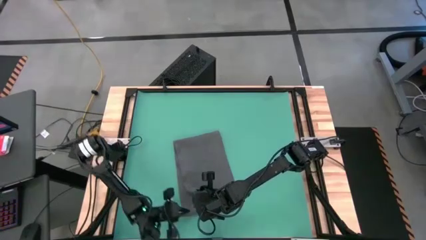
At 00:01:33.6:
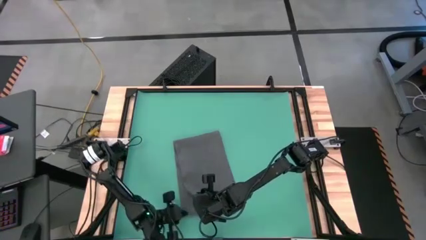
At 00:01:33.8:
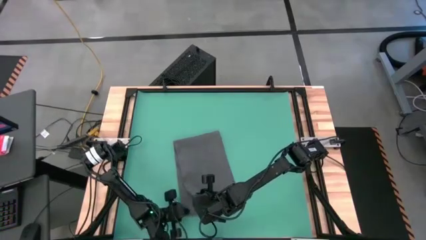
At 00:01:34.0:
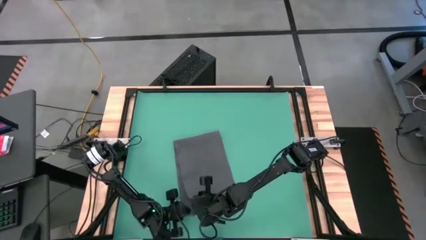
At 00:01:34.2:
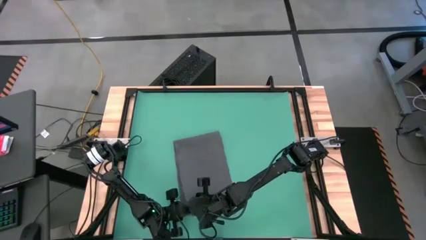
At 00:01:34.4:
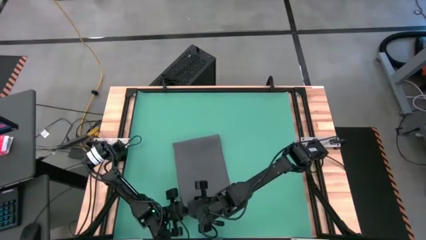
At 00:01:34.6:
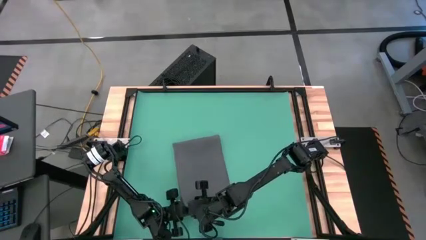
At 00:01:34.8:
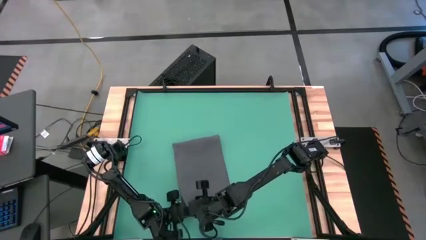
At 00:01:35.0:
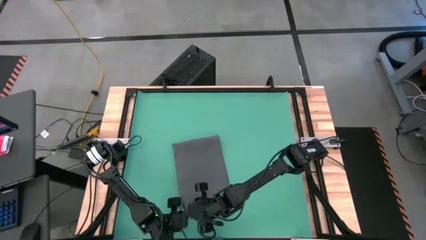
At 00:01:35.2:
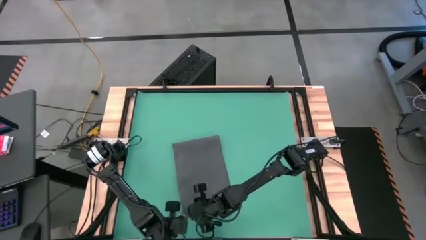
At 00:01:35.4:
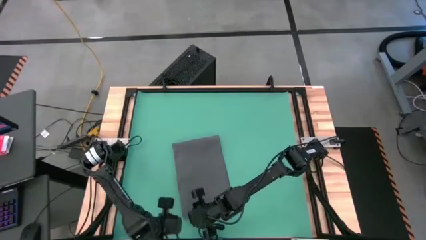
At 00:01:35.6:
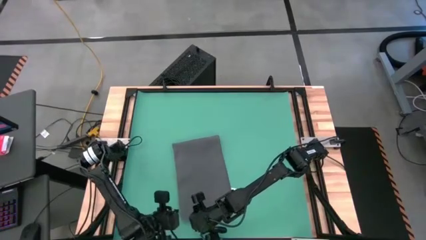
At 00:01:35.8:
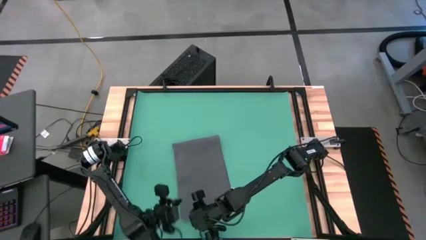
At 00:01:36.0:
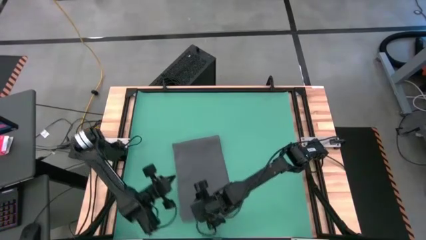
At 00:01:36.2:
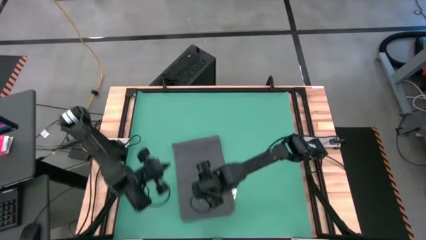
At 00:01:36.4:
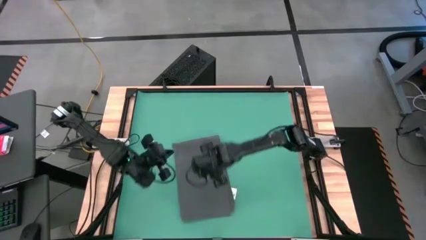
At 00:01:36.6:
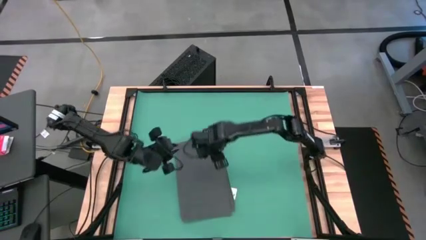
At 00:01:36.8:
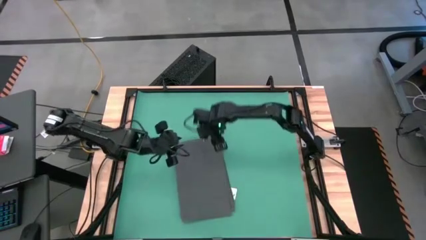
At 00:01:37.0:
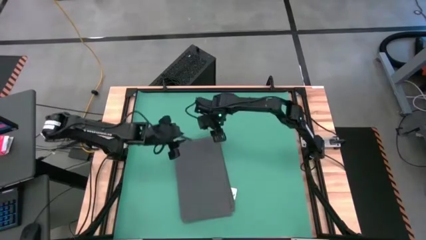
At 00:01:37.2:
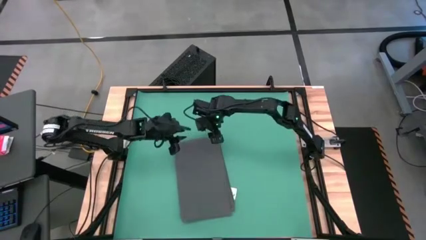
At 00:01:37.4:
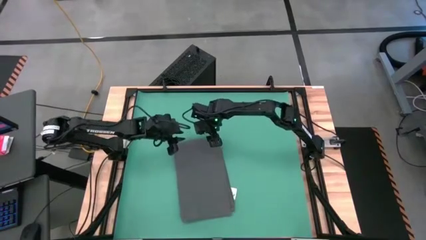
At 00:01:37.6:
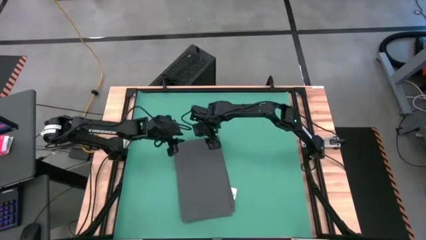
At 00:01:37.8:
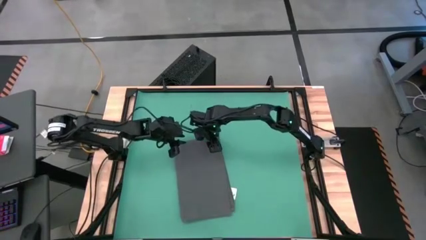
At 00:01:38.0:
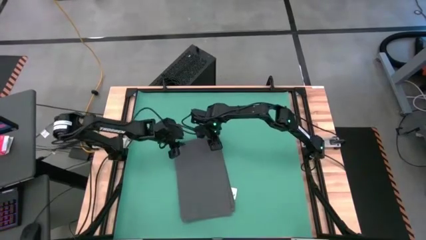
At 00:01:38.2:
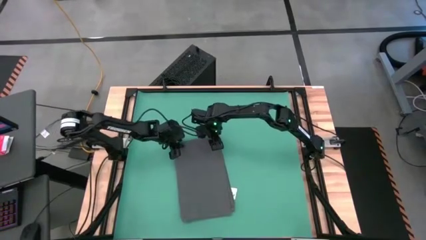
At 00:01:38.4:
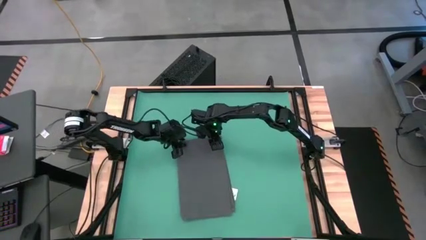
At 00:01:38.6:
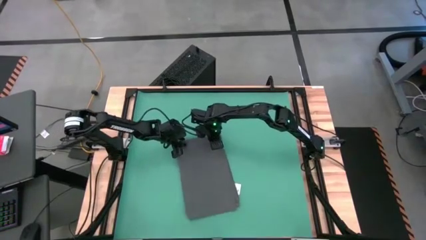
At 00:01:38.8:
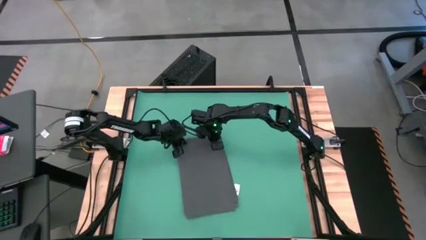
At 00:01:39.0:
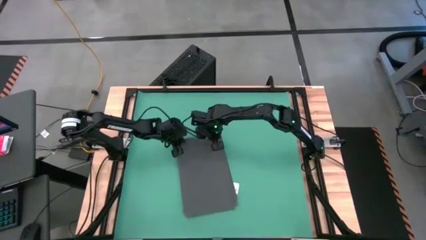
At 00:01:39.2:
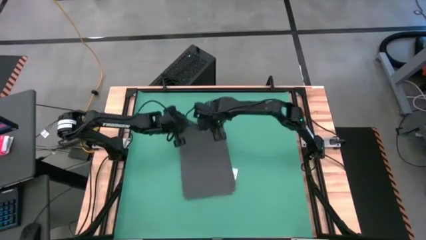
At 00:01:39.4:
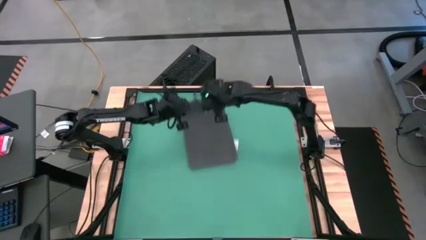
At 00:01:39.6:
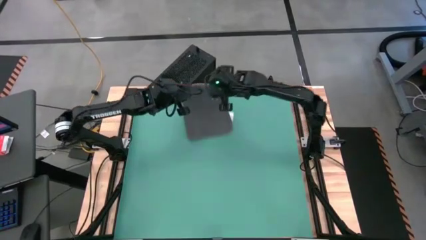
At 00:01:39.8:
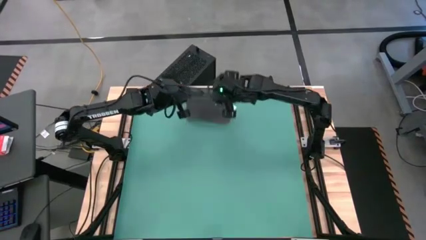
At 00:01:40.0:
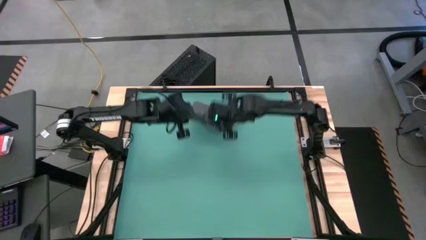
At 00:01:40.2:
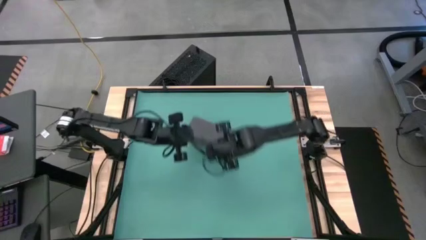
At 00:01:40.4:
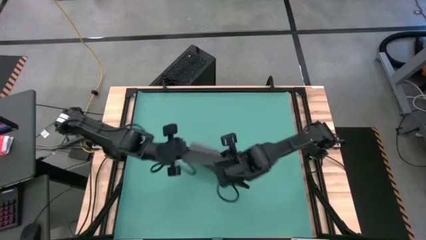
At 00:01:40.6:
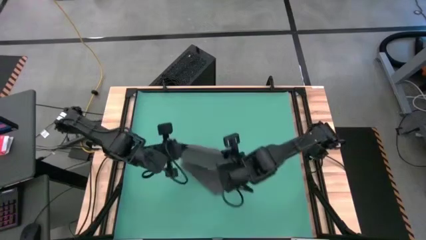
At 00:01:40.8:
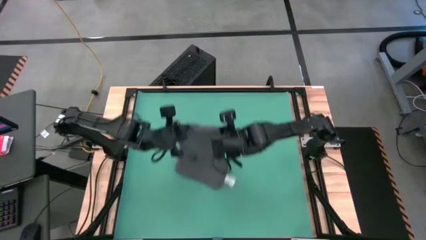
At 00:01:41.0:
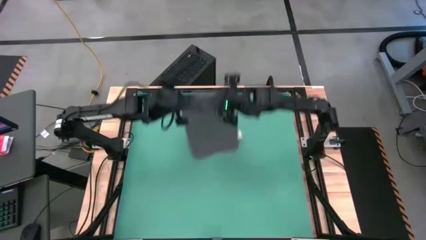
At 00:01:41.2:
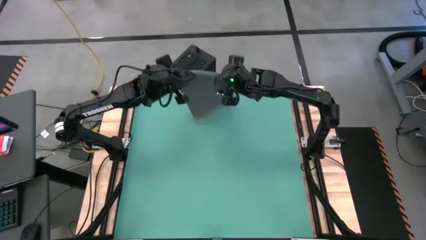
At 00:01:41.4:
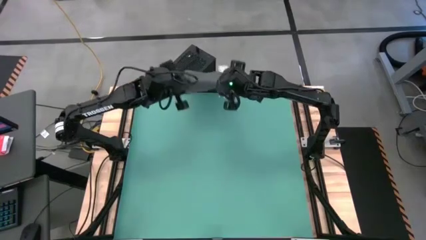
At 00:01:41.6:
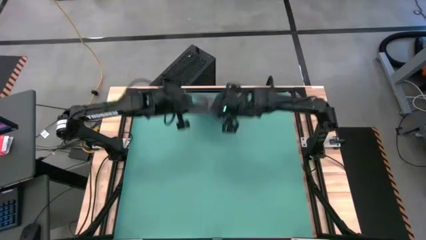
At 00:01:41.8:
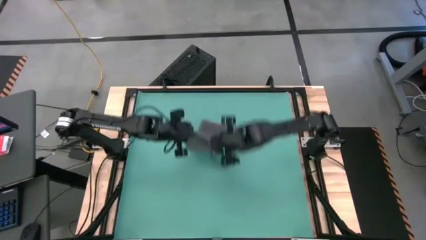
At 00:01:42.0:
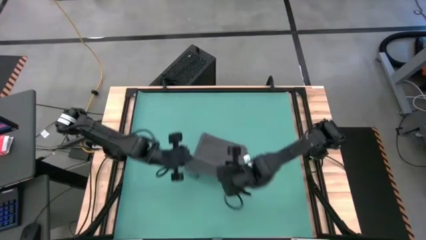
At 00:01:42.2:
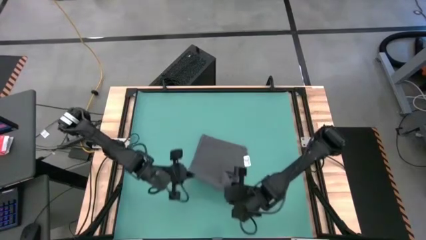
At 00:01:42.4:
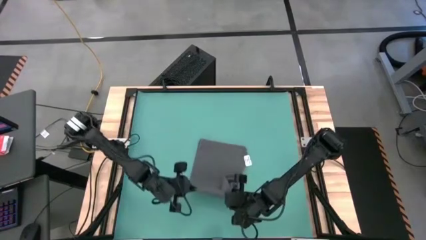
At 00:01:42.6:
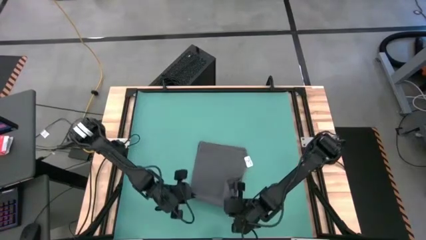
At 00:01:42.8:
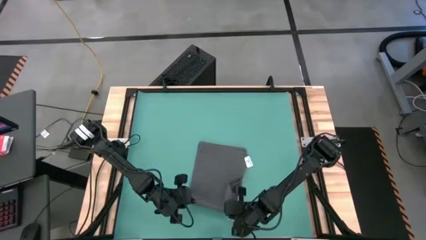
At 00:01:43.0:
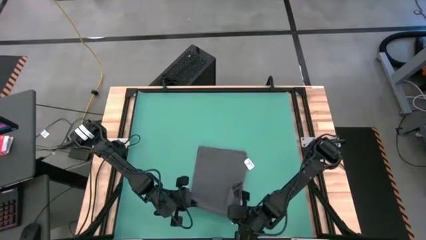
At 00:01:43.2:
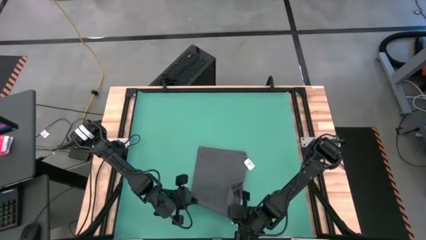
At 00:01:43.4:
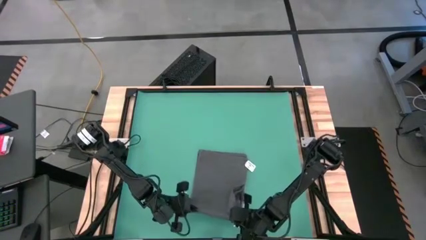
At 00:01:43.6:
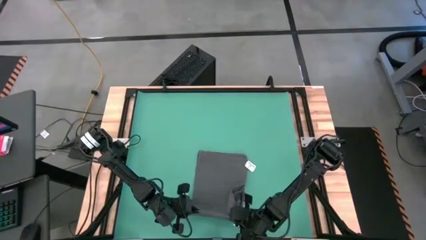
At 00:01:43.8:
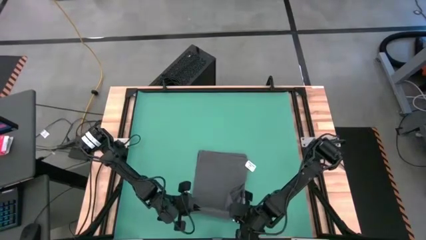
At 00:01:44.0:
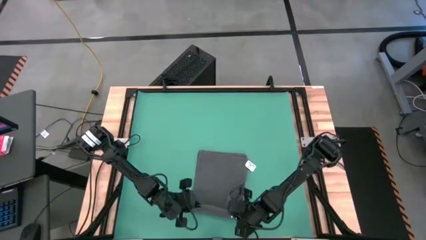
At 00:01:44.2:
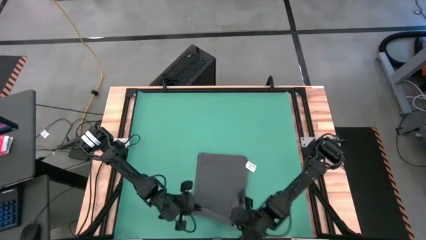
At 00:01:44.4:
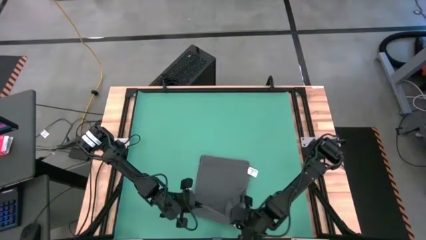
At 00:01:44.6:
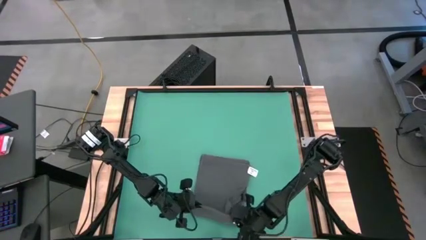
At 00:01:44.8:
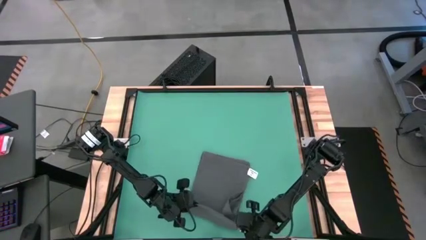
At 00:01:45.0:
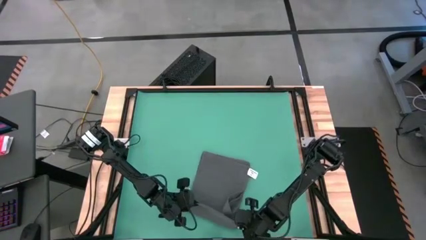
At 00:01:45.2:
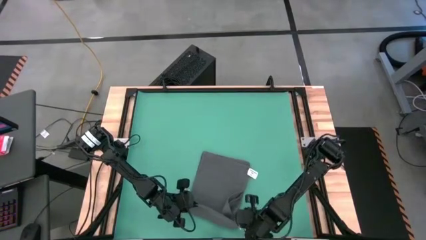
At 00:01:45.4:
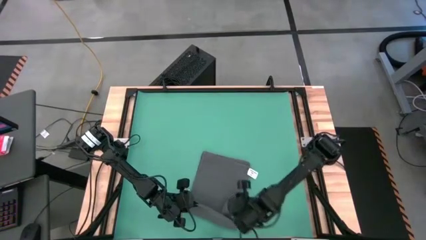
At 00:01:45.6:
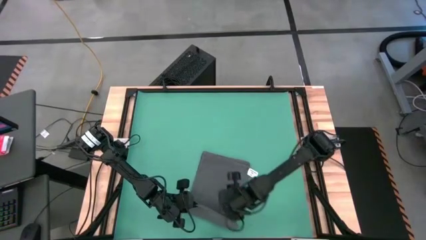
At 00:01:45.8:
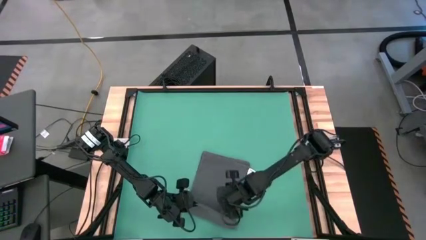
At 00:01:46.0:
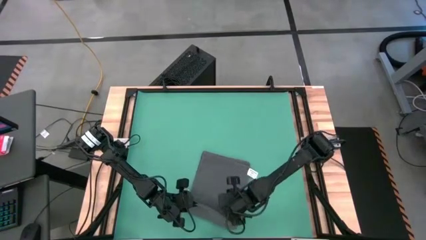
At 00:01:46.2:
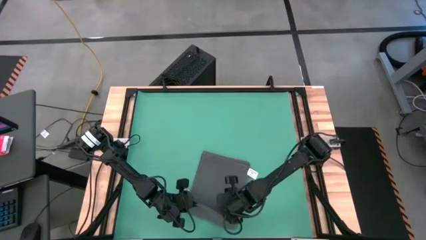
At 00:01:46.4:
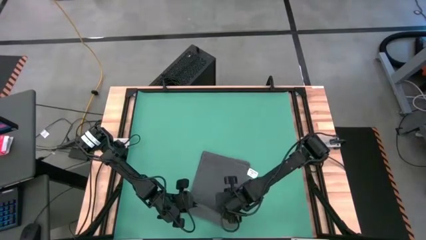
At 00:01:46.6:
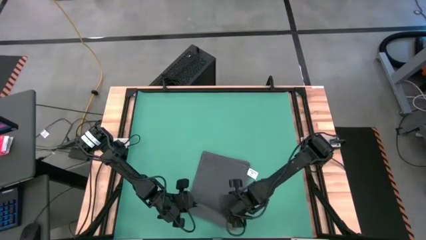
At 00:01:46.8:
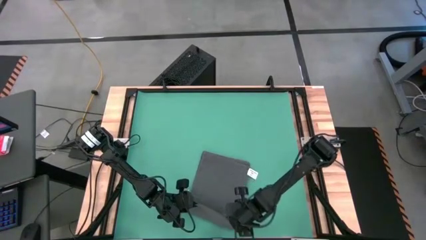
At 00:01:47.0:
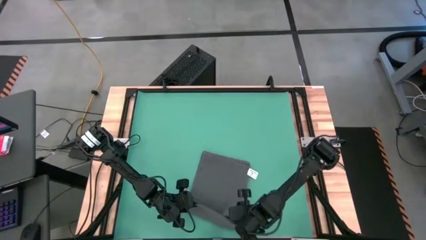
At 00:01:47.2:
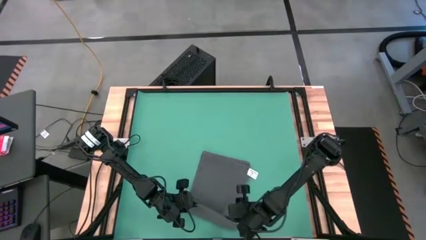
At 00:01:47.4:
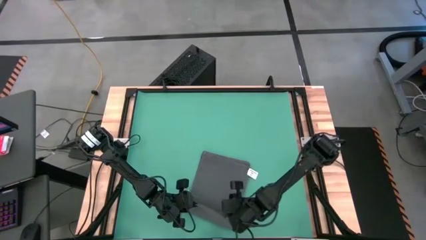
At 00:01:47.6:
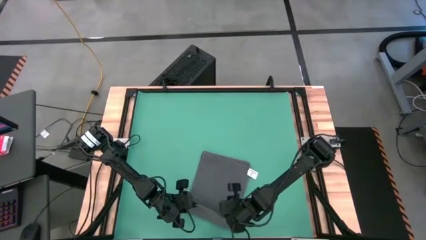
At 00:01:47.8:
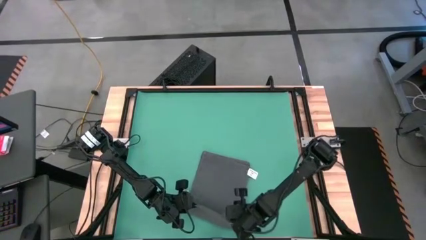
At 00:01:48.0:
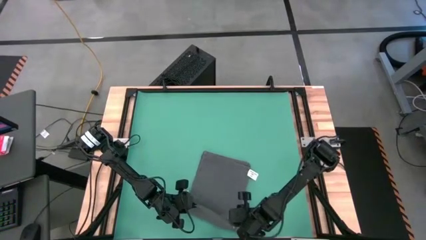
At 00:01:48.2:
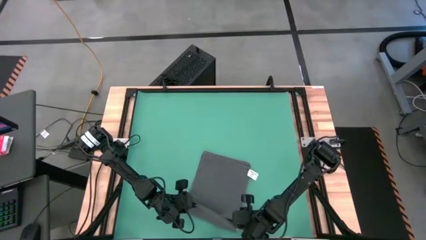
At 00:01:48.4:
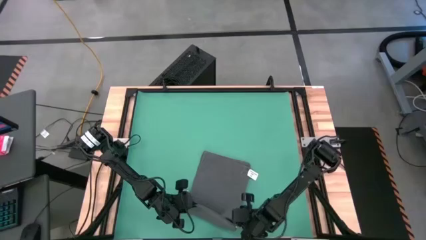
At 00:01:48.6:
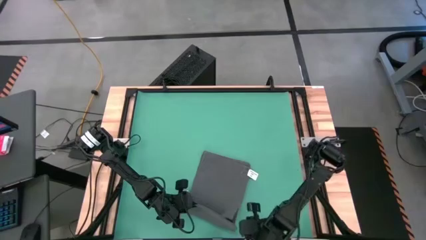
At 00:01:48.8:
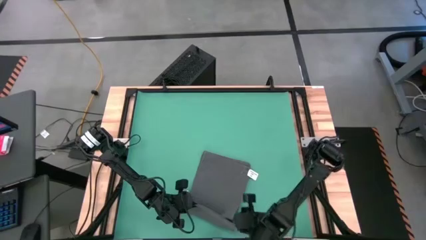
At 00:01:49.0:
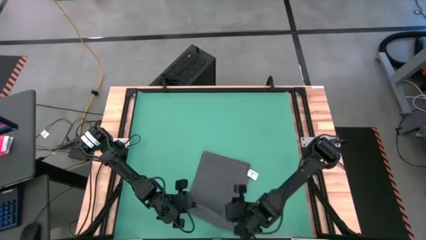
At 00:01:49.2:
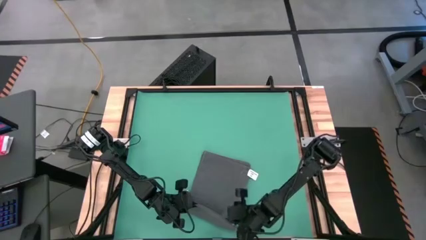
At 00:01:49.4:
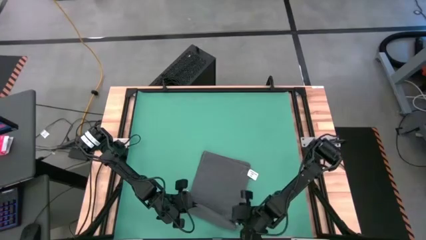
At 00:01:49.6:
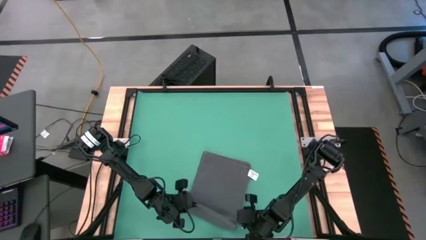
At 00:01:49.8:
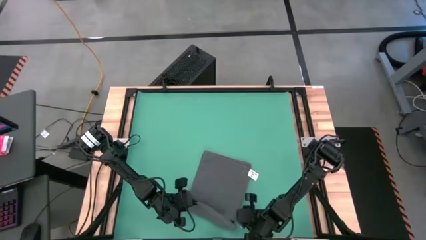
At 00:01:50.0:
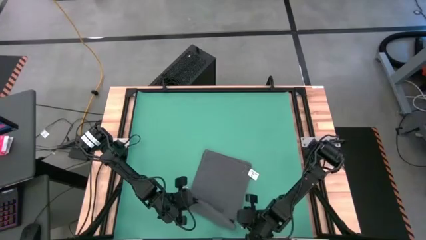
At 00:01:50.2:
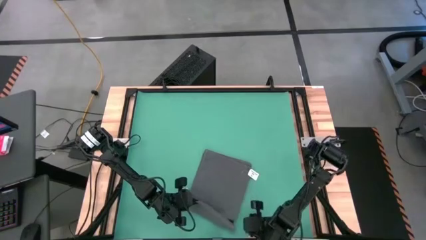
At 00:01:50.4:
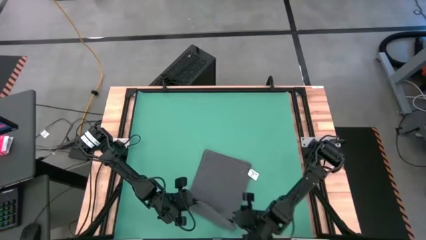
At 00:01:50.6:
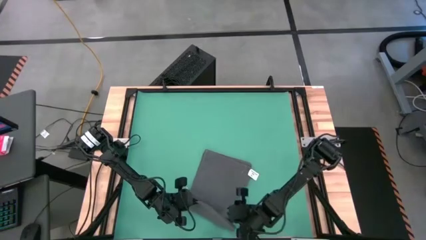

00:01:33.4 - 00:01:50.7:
Task: Roll towel
Roll the gray towel
